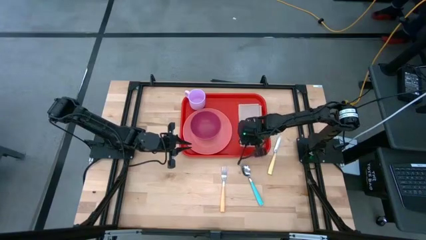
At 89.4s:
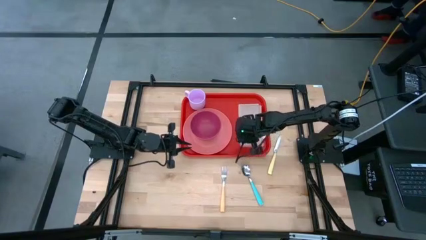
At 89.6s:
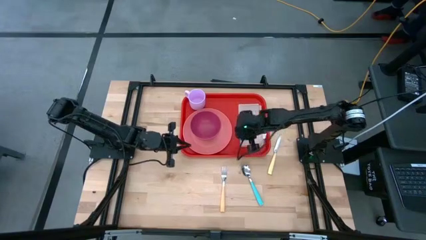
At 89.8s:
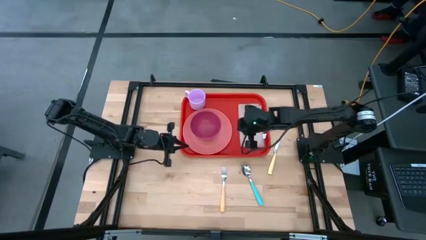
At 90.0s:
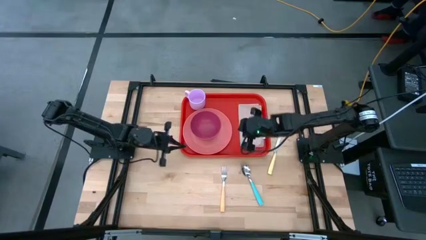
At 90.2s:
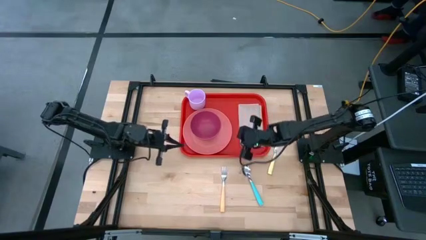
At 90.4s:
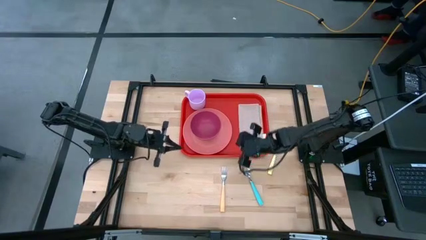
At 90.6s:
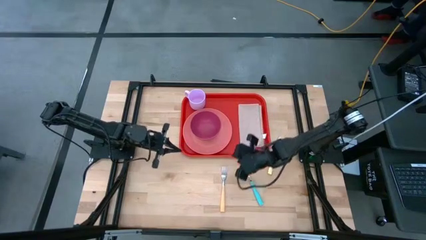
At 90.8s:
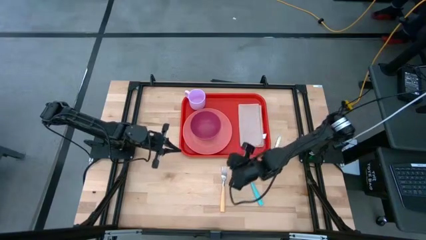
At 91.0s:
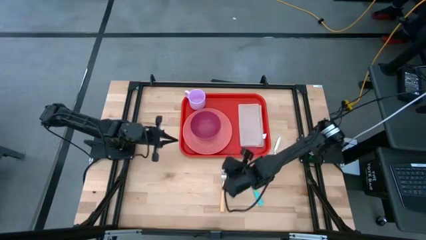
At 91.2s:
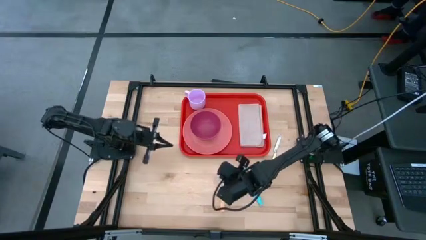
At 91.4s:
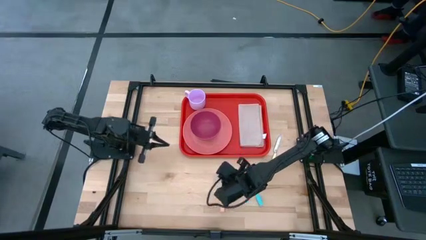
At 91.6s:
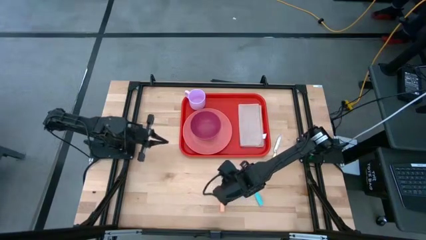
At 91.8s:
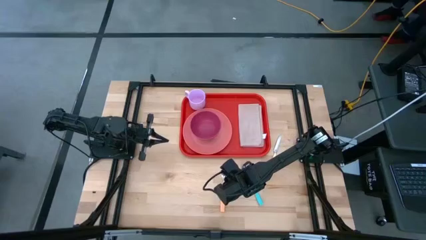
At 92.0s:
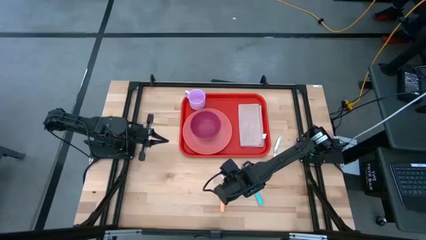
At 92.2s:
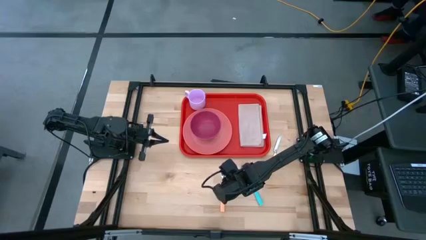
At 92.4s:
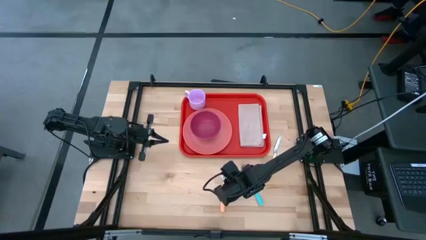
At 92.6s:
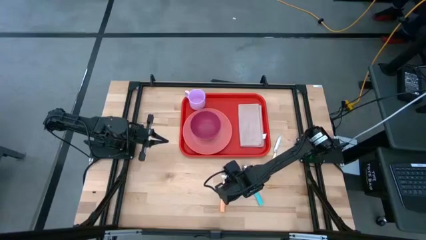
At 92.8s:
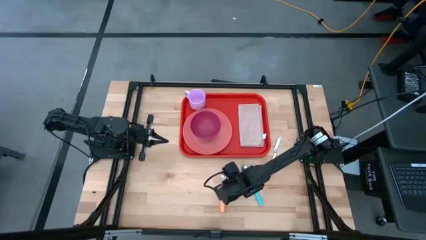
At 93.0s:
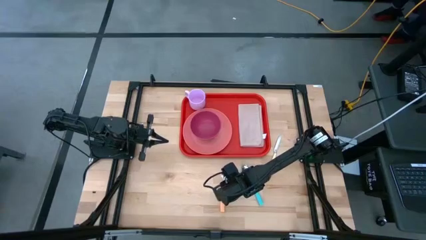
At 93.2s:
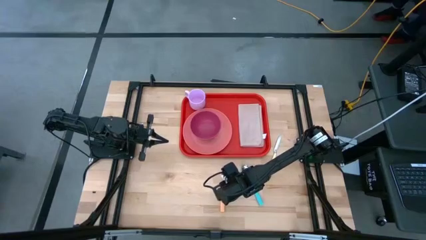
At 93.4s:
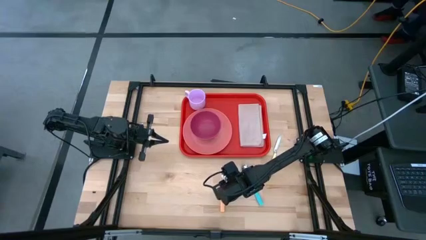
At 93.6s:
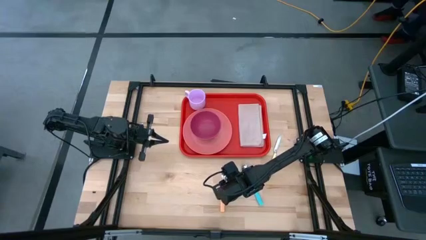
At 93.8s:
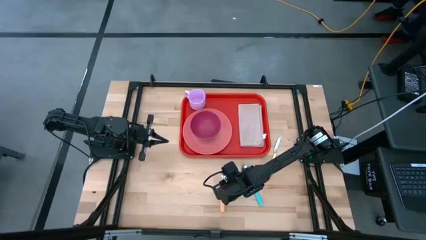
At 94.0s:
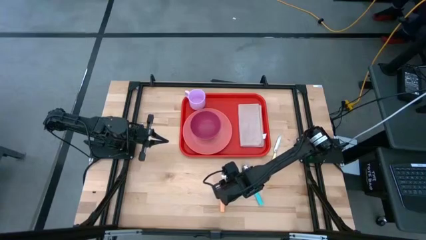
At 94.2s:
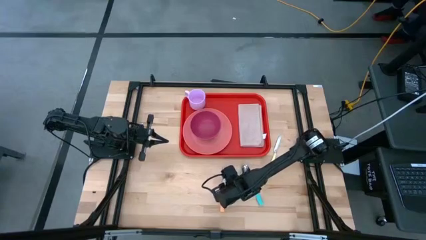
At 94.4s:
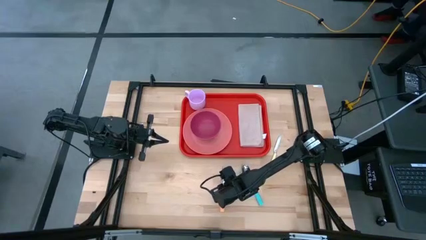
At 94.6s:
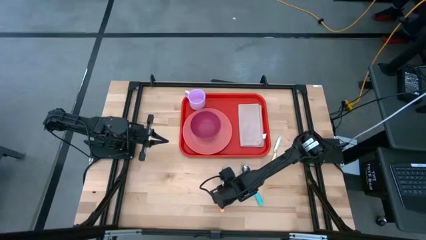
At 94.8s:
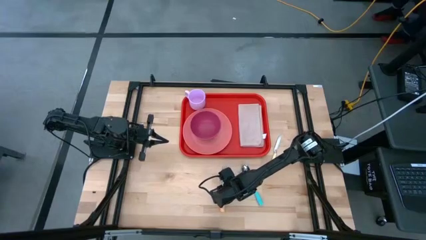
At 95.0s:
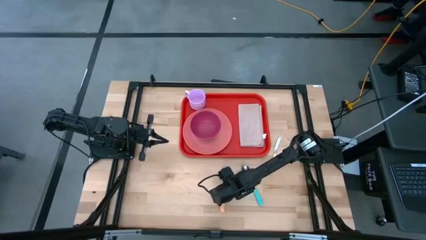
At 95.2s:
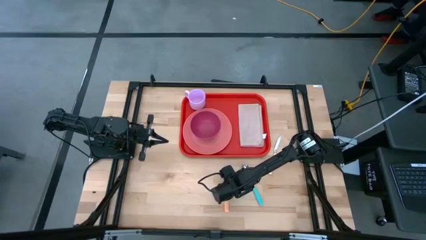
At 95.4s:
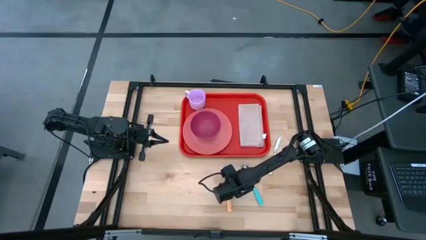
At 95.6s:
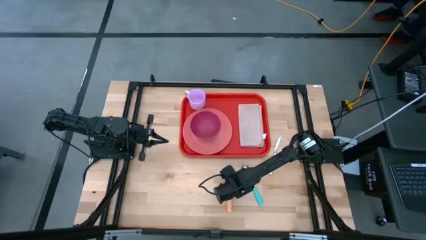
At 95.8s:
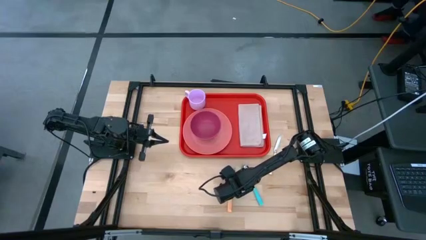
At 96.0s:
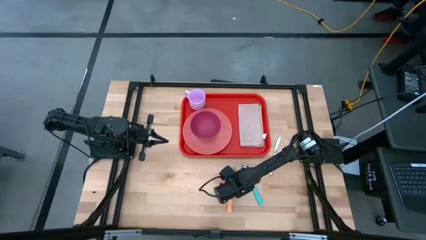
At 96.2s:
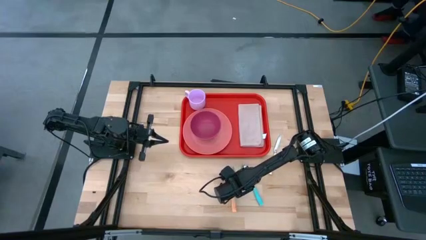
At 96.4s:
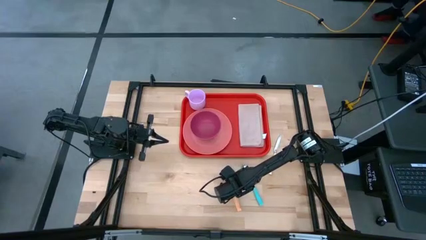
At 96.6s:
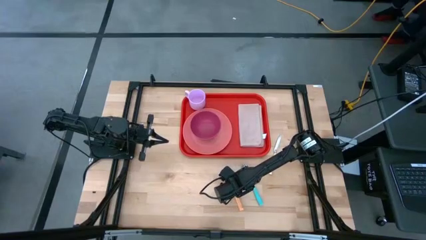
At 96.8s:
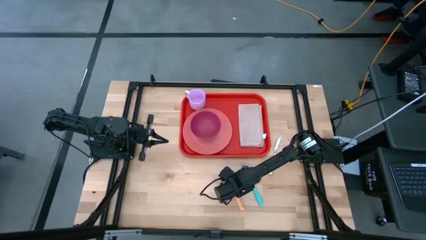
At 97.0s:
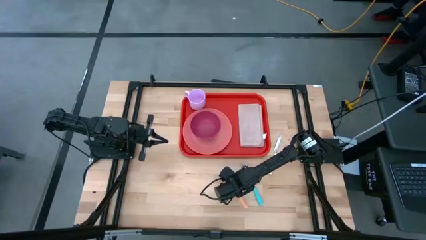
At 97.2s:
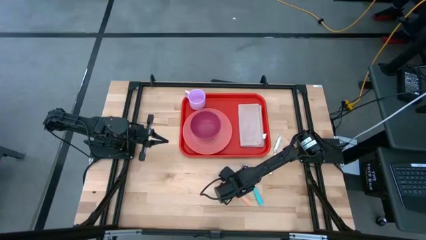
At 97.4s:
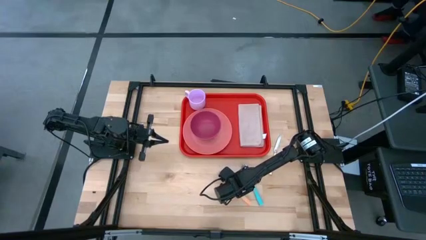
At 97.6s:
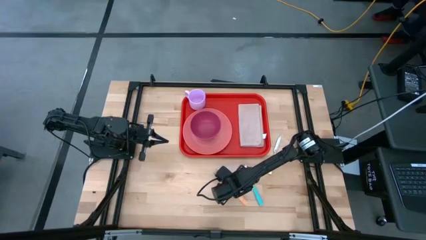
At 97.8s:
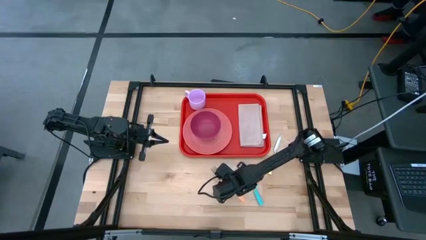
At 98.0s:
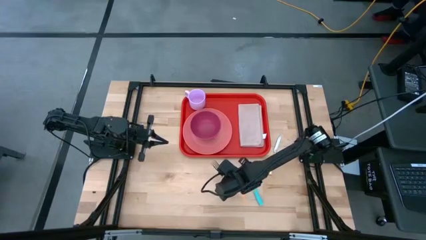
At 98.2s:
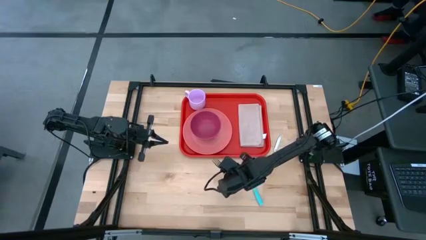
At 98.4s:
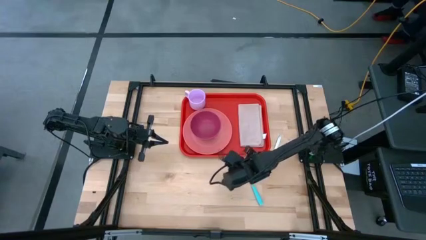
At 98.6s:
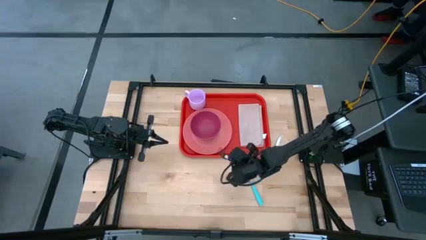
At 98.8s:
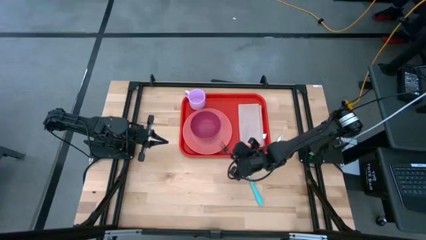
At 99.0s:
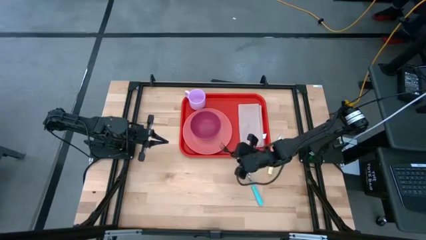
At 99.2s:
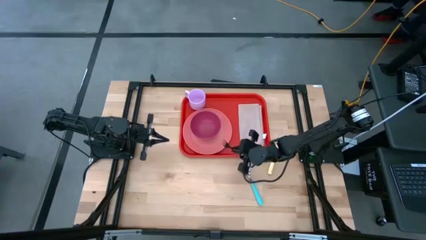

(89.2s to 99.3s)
Task: Set up tray
Put the orange fork on the brown table napkin

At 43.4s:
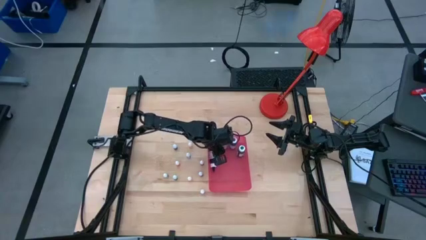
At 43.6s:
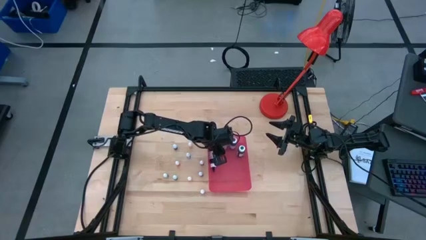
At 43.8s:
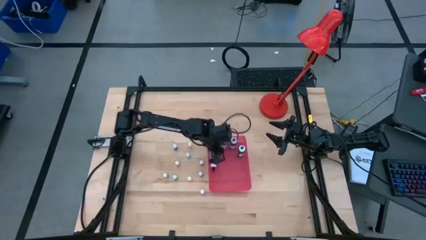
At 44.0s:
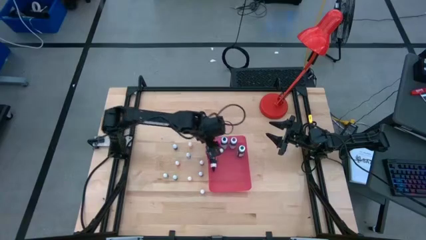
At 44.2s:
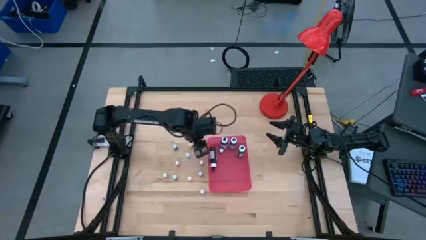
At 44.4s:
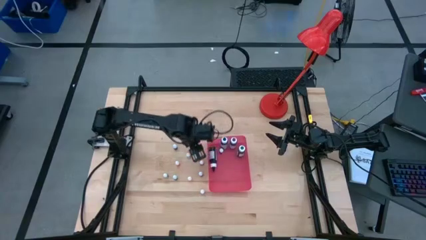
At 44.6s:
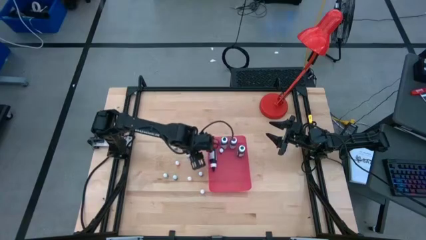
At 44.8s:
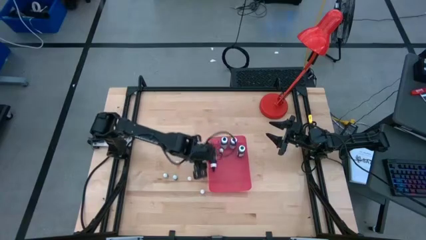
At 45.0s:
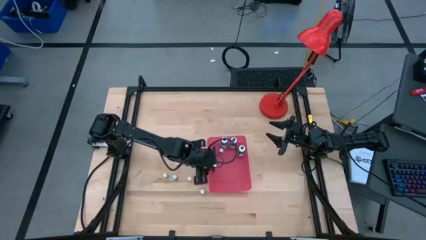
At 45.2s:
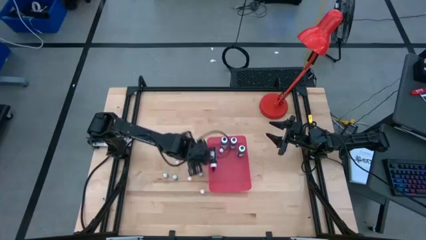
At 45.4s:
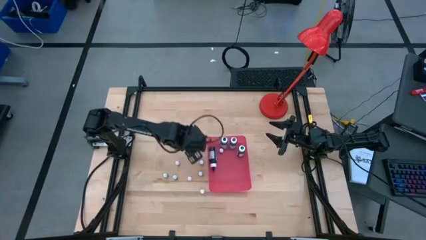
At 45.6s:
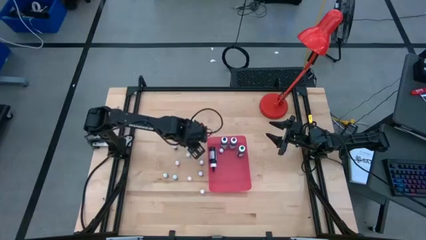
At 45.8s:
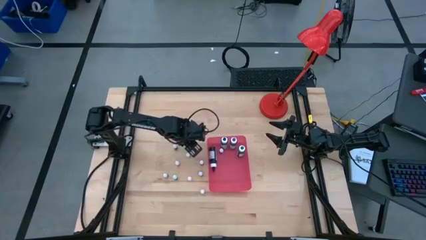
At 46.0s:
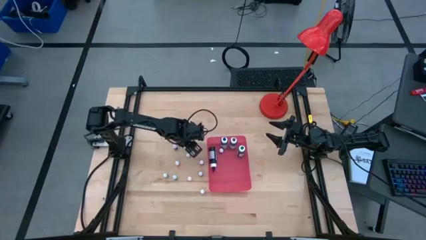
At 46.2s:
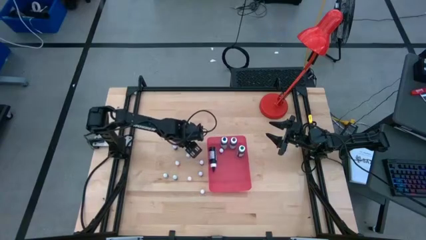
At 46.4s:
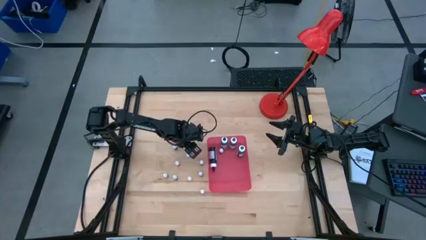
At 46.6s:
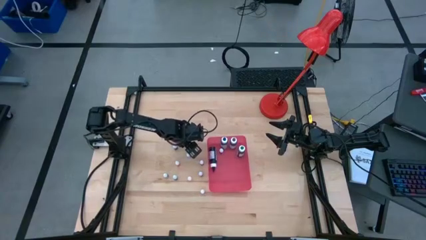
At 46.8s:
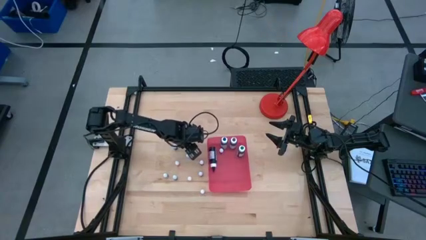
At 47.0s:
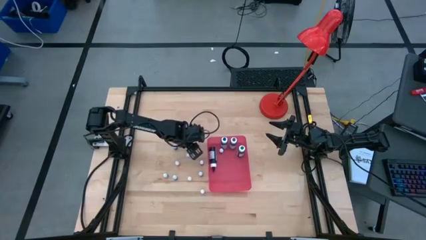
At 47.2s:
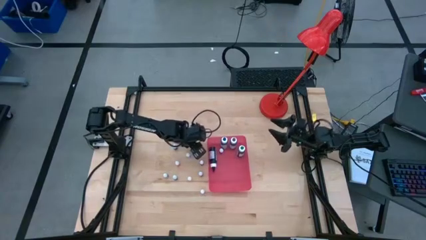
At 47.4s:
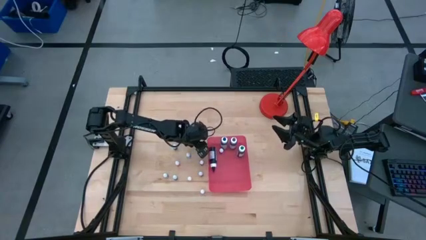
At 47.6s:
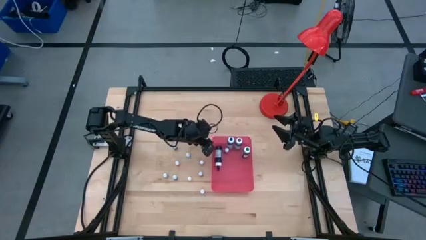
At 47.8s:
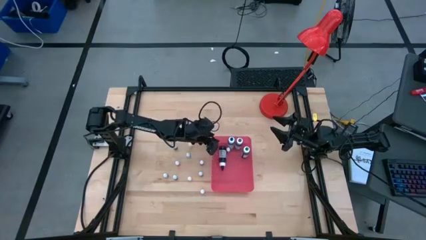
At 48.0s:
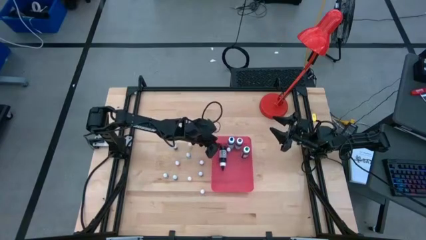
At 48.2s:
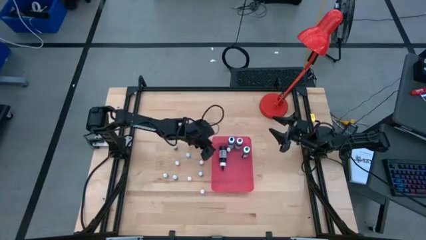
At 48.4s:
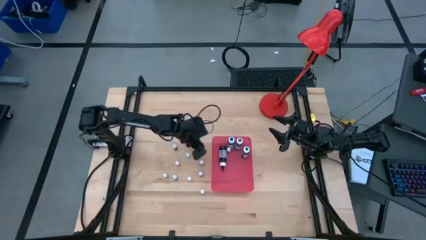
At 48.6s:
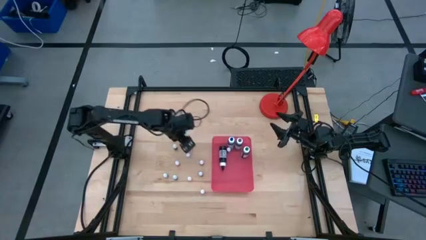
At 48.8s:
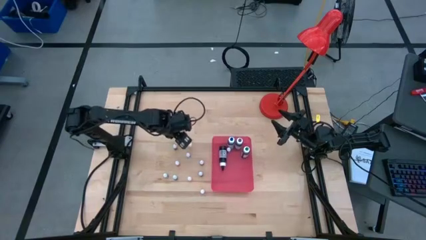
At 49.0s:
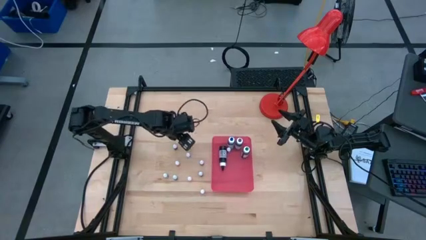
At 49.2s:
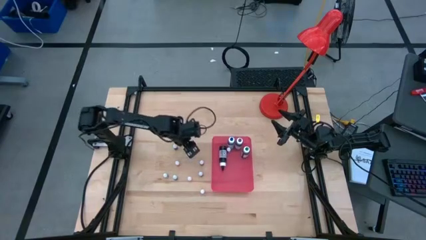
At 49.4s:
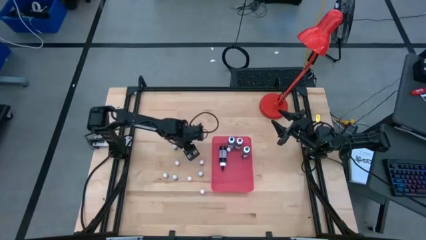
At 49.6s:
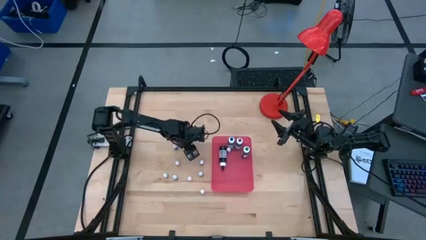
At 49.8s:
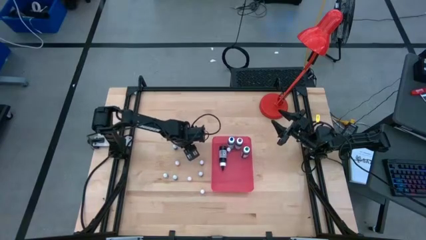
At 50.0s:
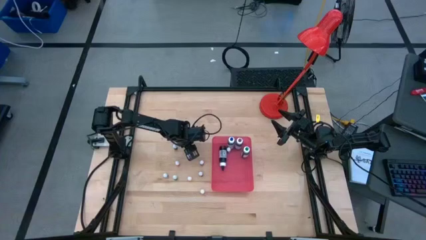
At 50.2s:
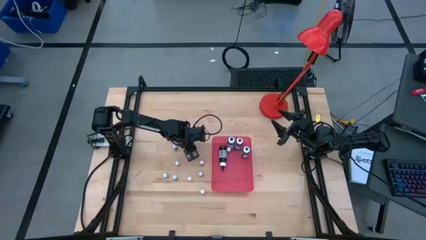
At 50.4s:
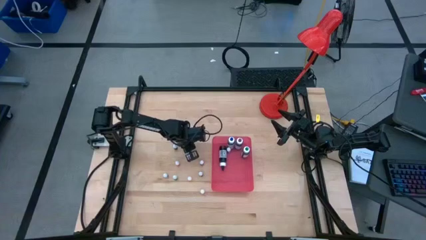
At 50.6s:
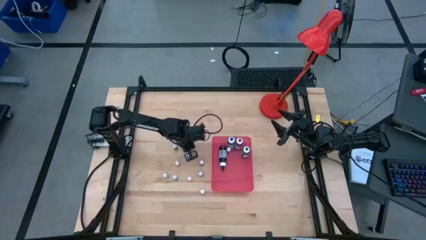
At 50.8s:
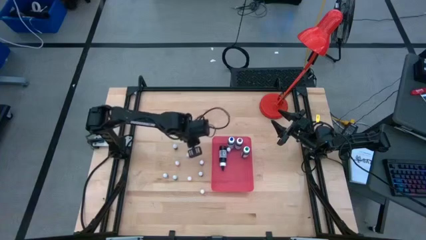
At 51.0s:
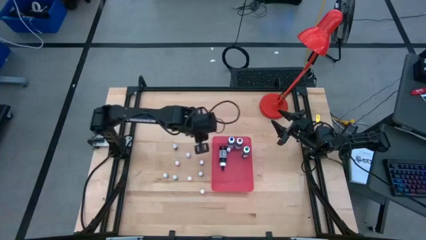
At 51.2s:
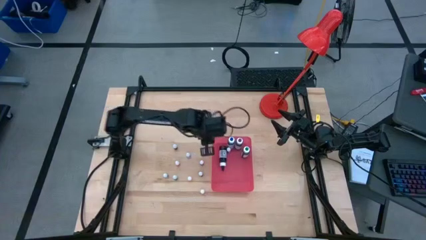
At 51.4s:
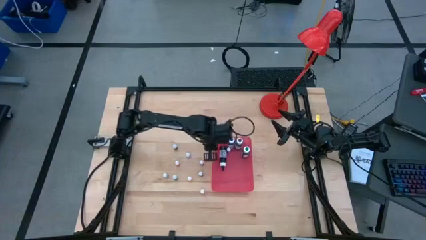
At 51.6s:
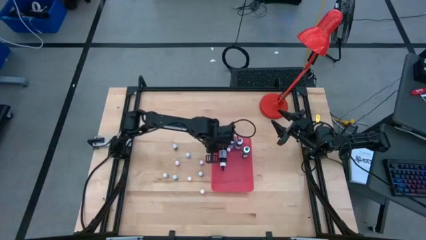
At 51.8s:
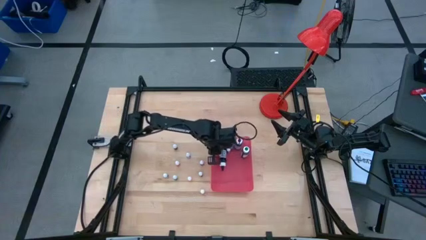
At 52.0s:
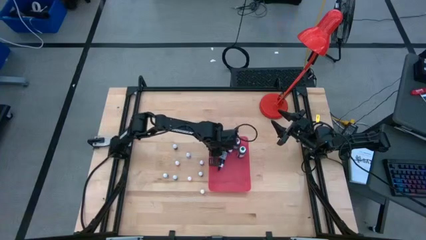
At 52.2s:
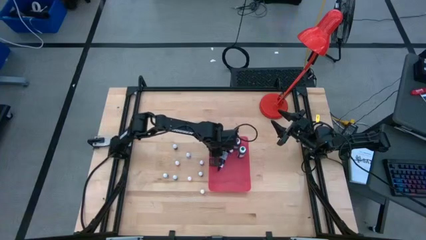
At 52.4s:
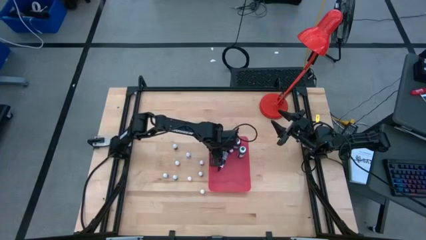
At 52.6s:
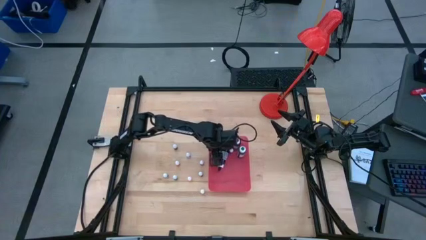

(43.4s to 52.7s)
Task: Pick & Place food coloring
Put the small yellow food coloring bottle into the red bin
